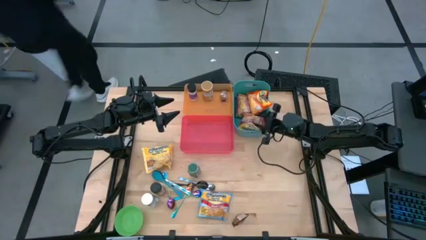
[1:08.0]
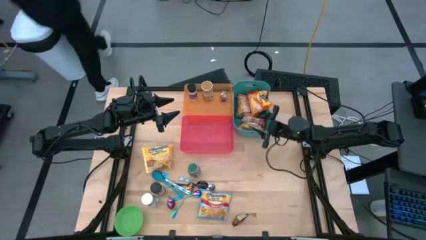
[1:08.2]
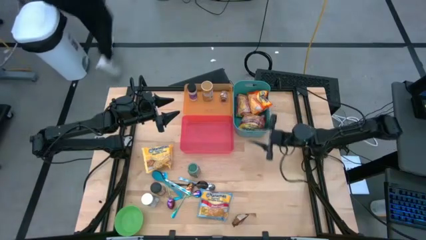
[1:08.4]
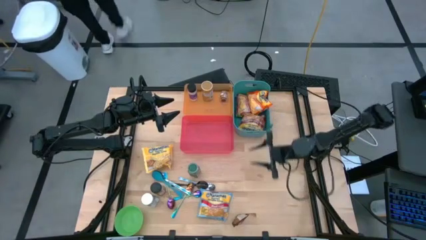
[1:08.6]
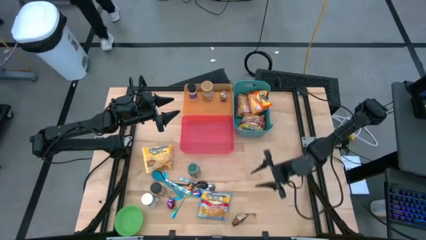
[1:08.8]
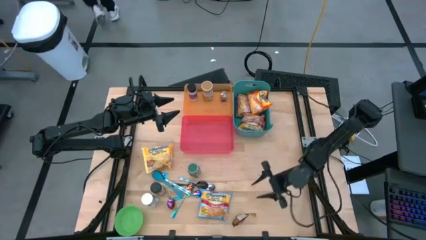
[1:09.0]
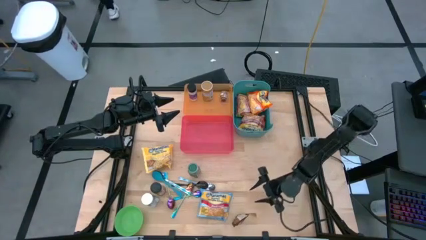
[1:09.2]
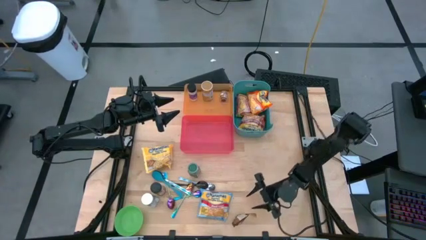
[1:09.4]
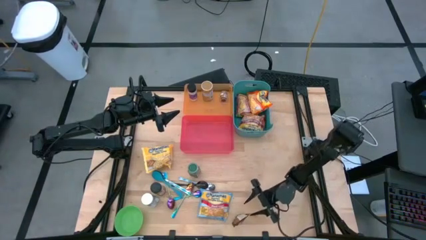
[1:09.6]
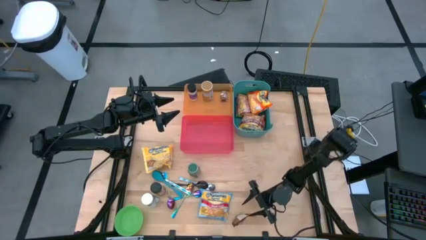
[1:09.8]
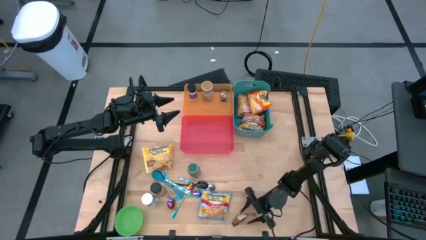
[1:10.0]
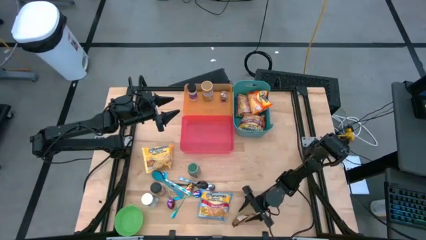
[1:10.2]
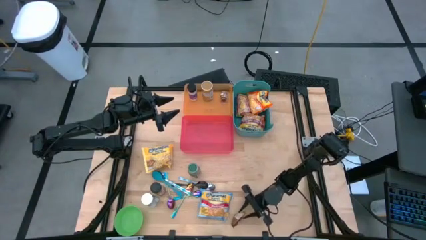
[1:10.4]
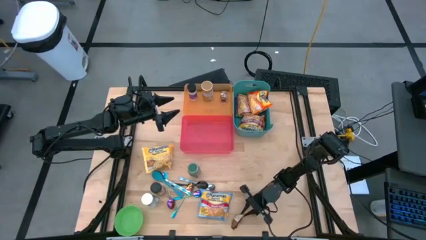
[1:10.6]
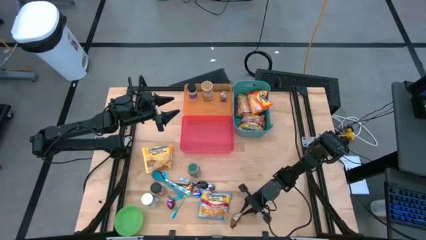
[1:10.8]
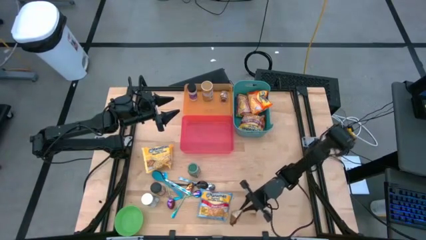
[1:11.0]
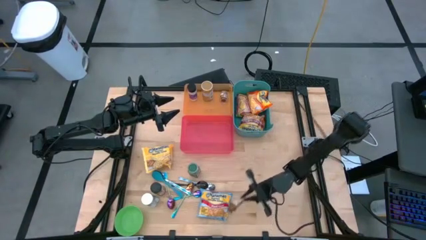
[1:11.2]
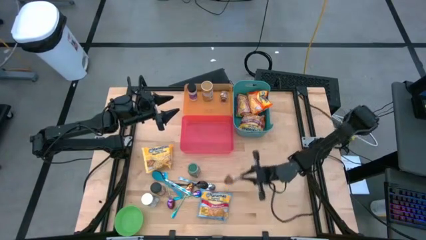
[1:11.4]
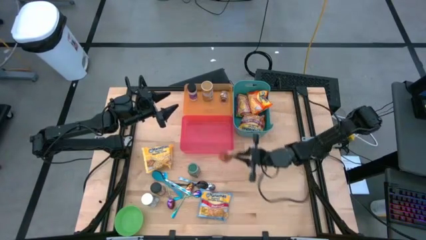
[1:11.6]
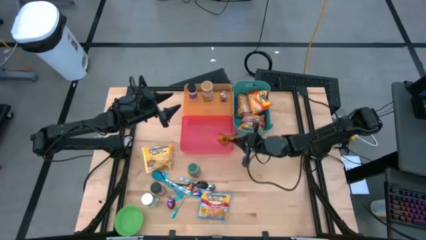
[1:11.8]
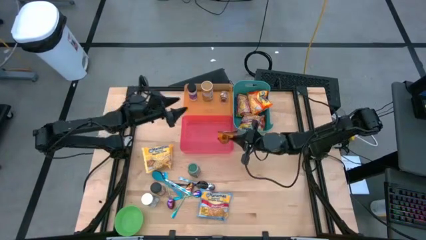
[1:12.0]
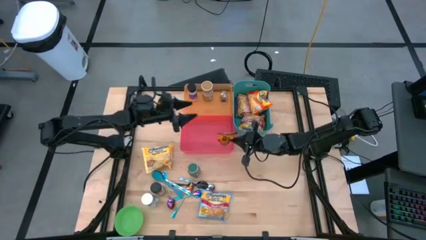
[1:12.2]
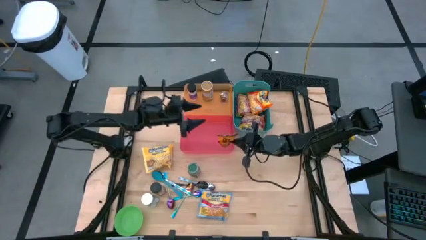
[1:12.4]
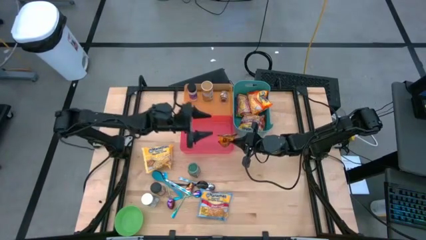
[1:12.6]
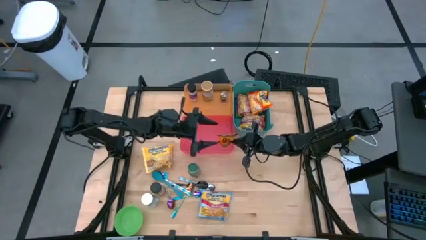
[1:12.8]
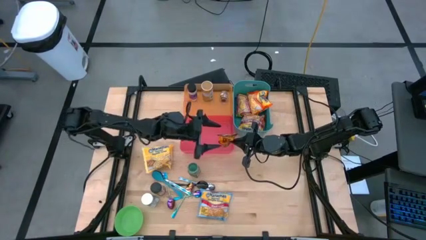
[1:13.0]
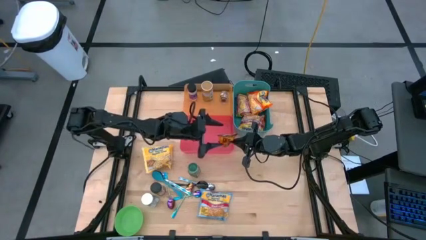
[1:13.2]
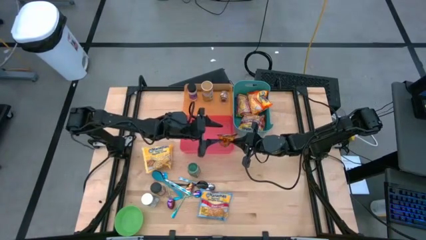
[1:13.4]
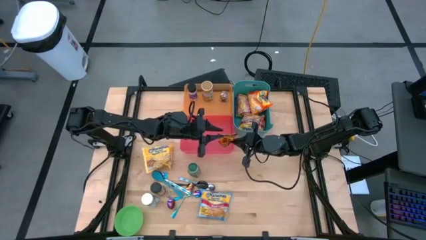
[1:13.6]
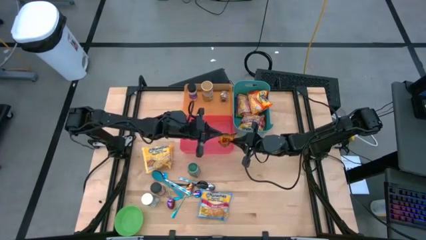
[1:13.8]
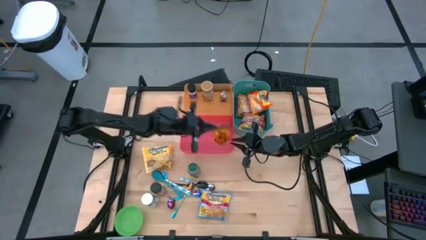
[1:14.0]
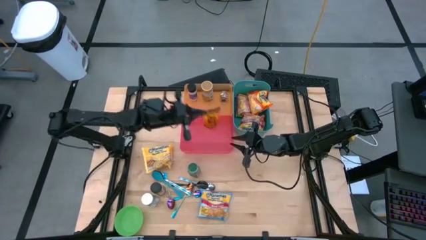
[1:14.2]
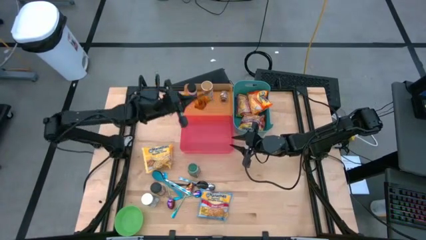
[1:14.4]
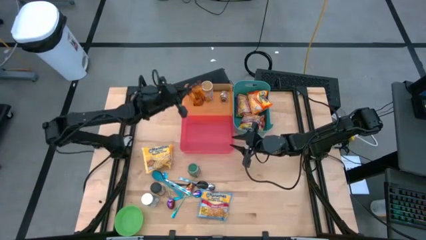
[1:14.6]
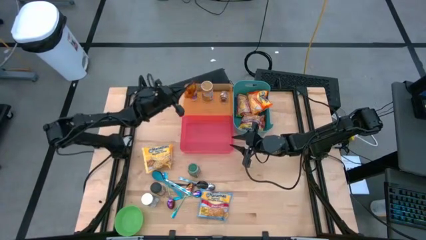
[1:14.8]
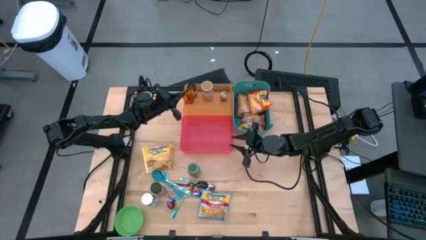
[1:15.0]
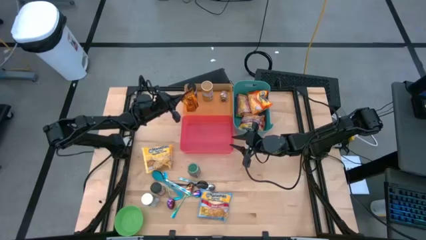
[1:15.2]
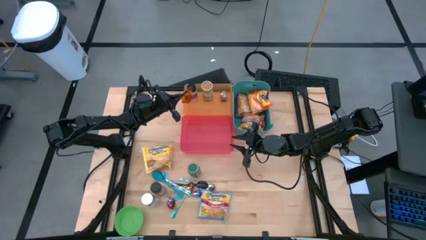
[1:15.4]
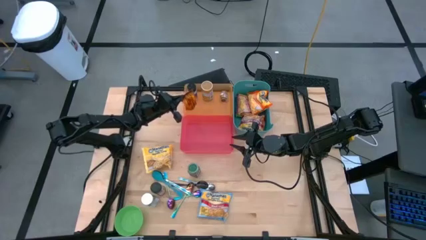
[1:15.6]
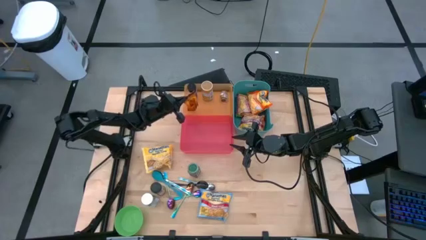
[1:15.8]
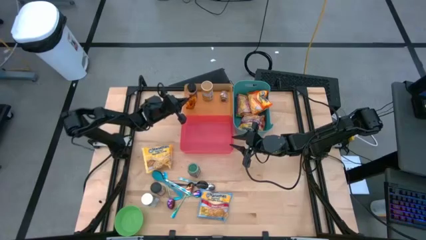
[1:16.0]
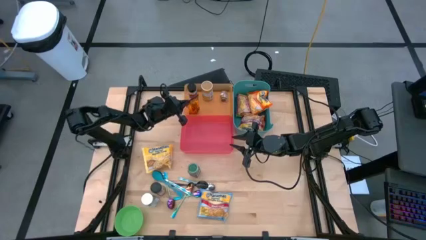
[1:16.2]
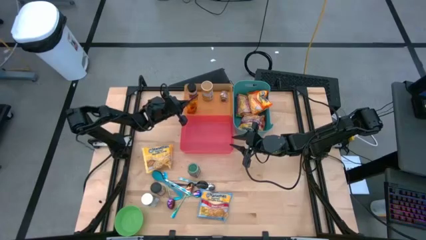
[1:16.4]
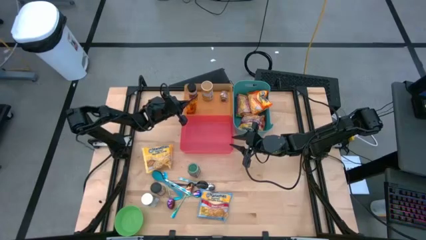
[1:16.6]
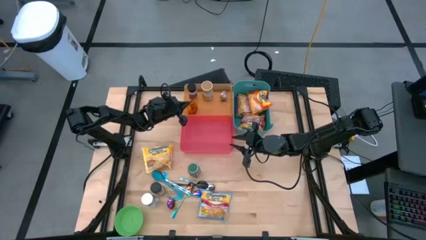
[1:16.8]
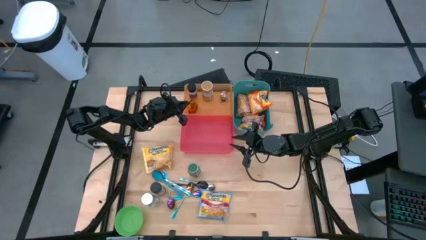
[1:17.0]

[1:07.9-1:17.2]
Task: Pick & Place Food Item
Put the orange spice pack into the orange bin

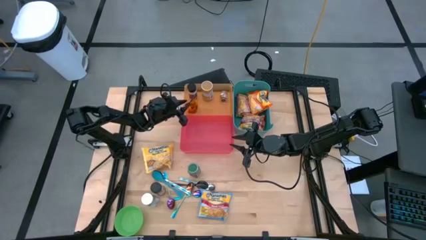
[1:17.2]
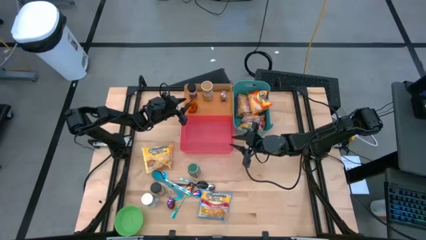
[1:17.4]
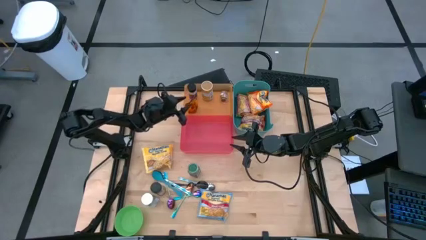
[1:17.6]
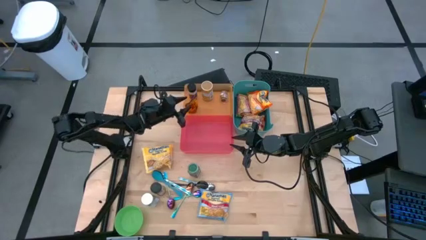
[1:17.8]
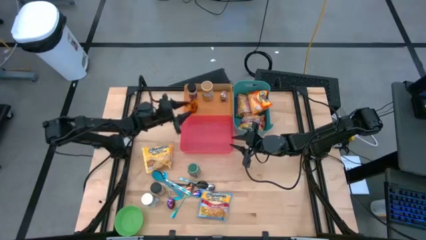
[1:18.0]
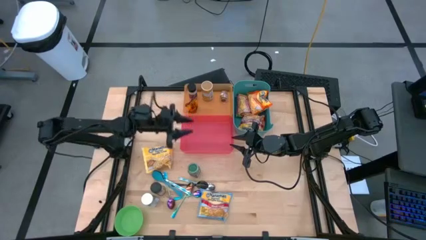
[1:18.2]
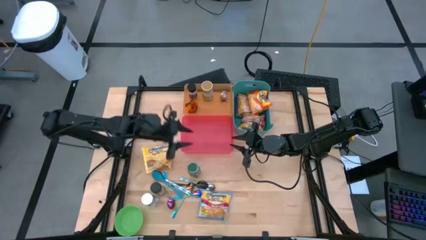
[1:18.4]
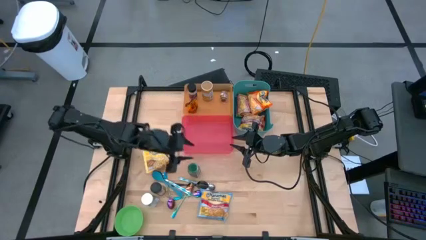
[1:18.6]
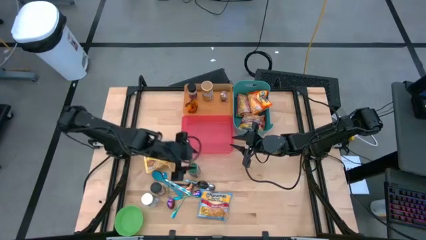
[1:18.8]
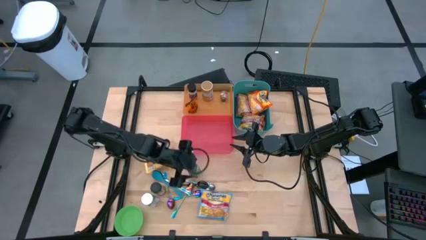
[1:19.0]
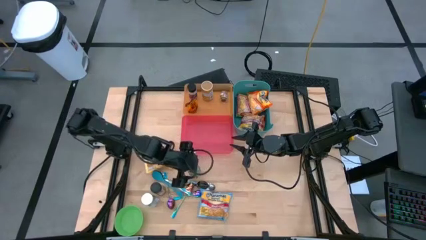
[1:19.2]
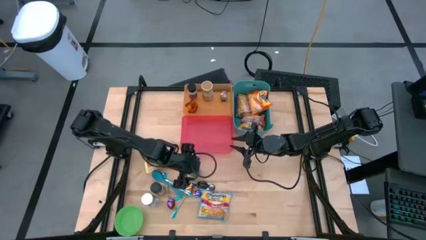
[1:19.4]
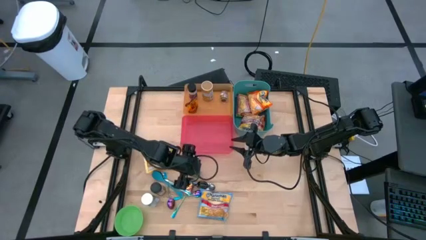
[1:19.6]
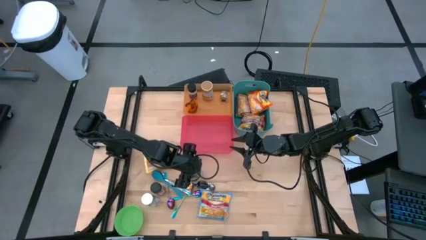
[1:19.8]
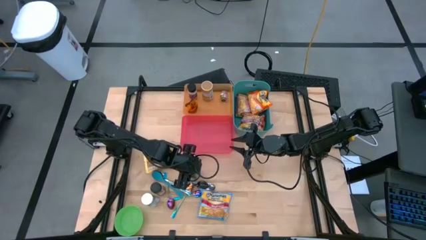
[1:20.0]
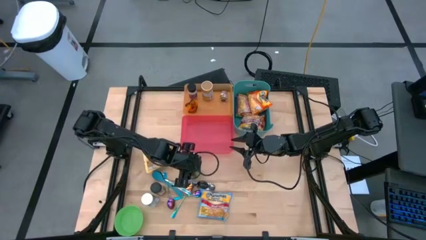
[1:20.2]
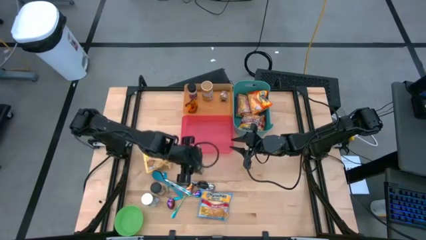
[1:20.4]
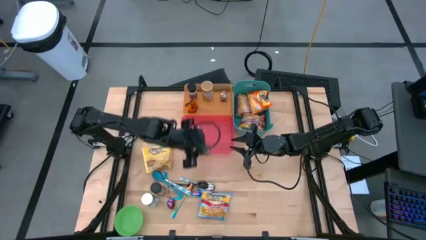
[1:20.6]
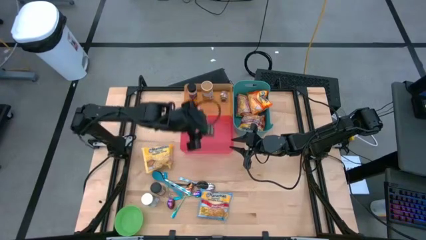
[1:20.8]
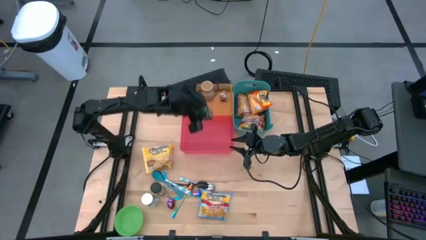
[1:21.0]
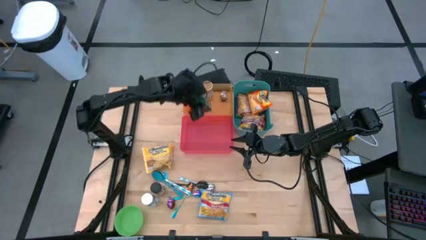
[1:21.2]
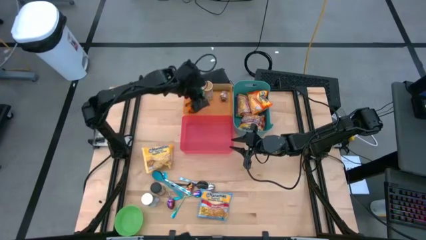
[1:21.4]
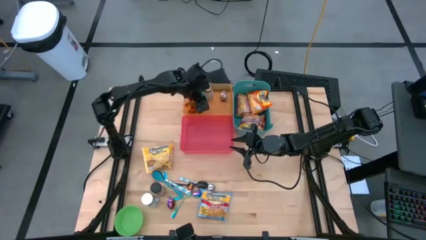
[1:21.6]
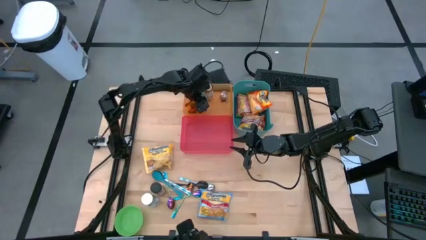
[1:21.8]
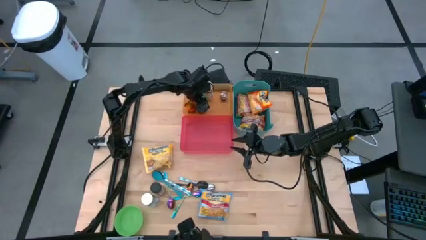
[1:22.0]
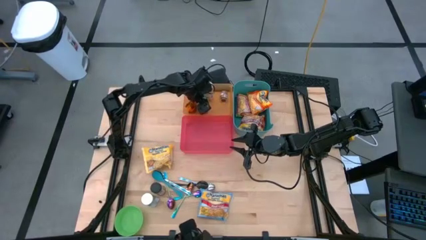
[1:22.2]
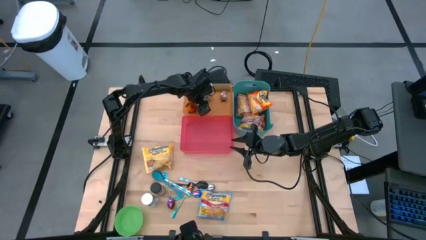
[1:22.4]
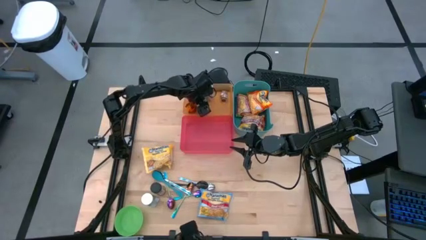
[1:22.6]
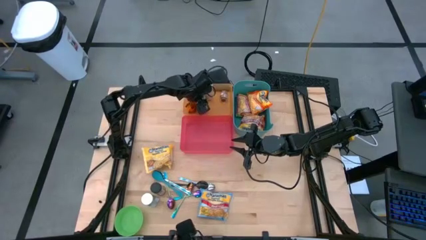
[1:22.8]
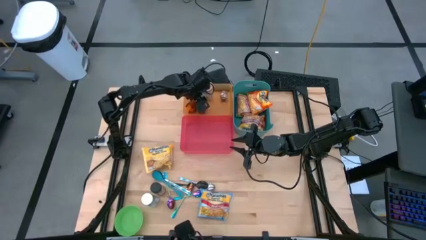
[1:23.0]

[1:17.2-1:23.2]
Put the green spice bottle into the orange bin
